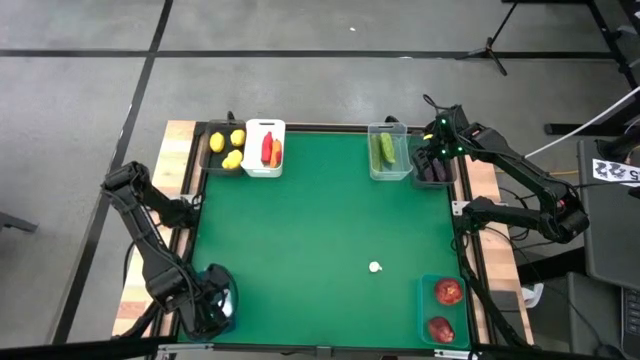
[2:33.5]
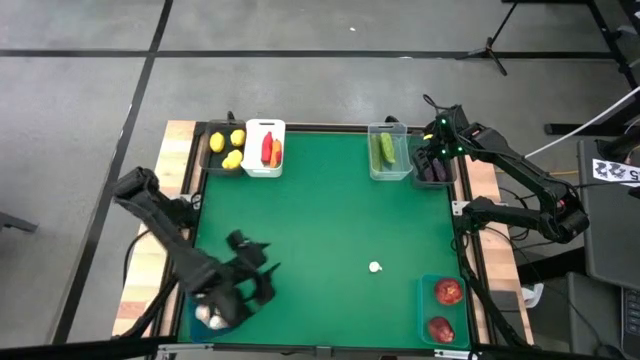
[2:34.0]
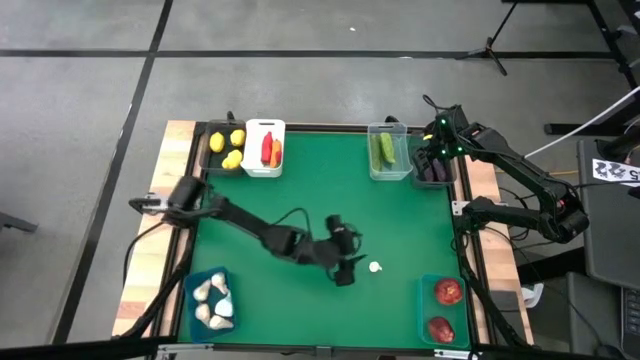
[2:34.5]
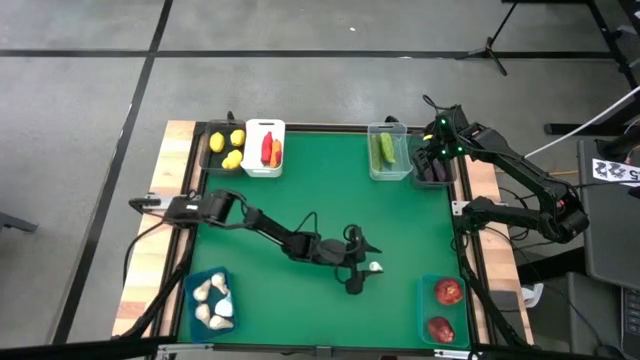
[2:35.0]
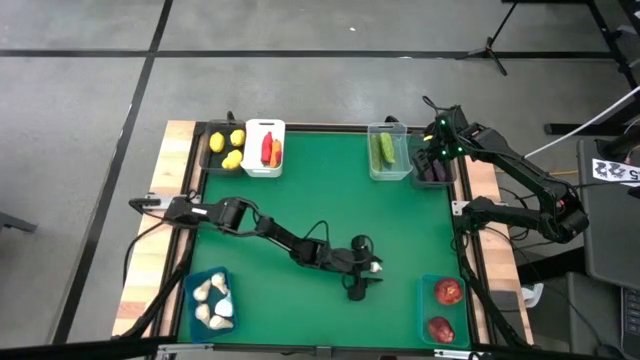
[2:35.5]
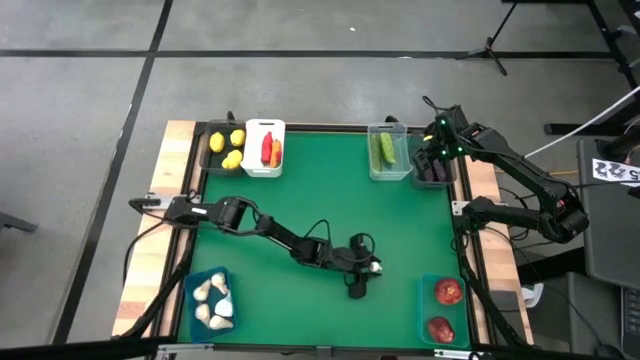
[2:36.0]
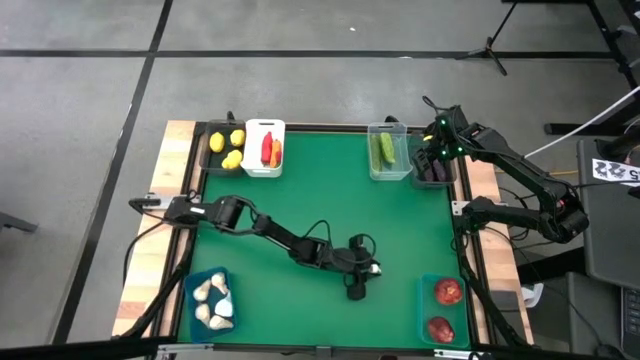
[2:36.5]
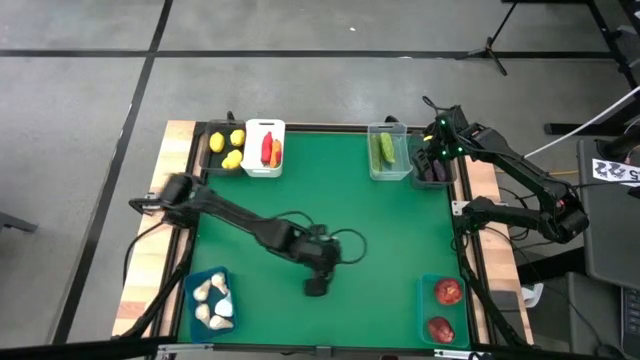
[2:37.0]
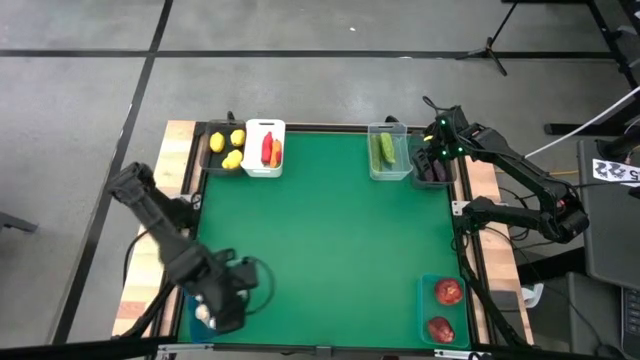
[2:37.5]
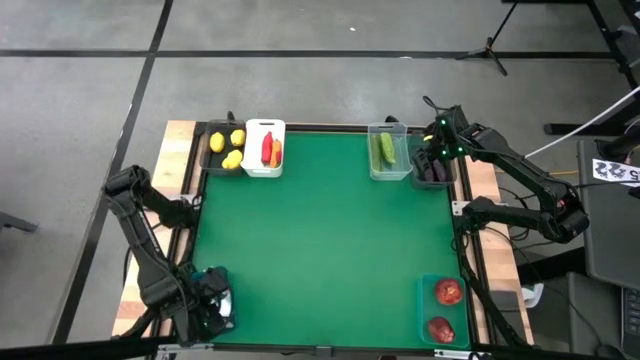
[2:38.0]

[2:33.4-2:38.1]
Task: Sort produce into baskets
Put the garlic into the blue bin

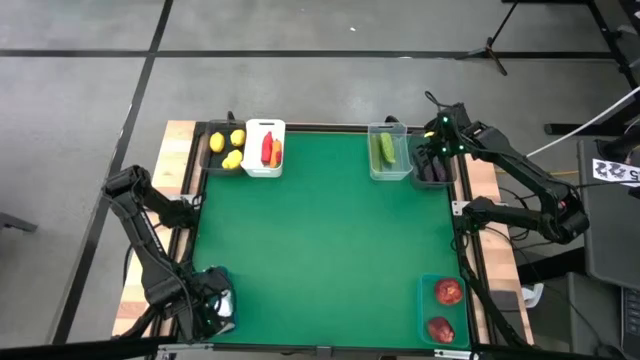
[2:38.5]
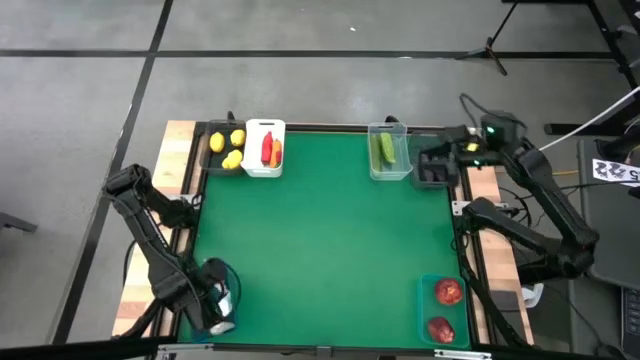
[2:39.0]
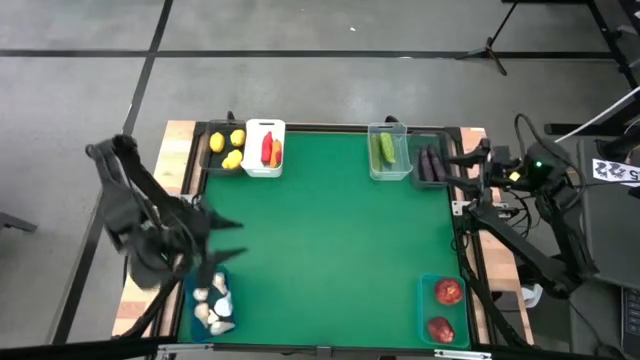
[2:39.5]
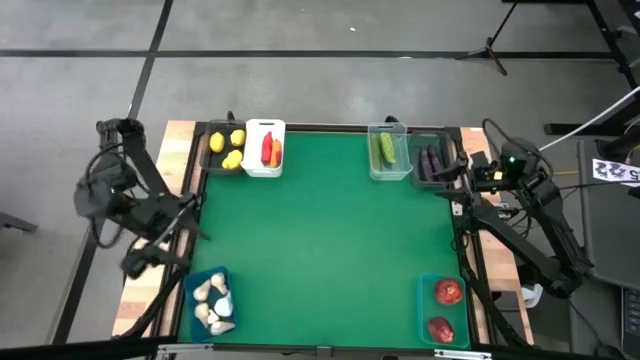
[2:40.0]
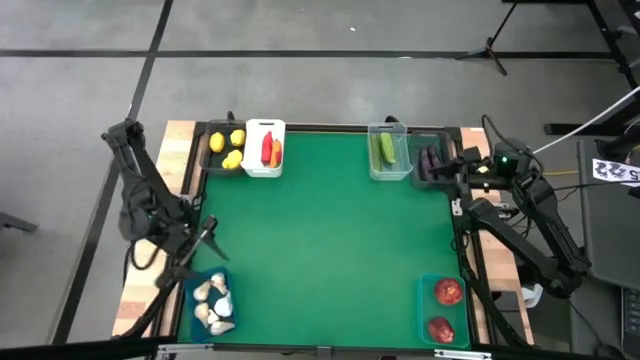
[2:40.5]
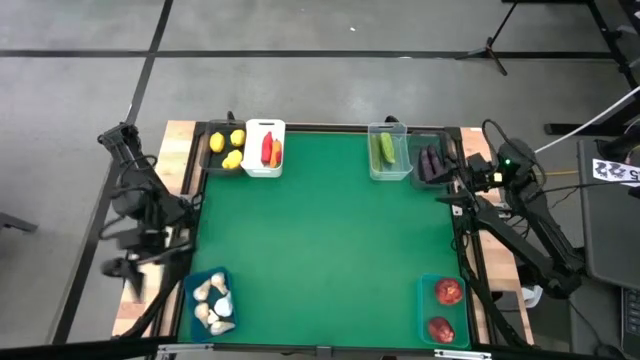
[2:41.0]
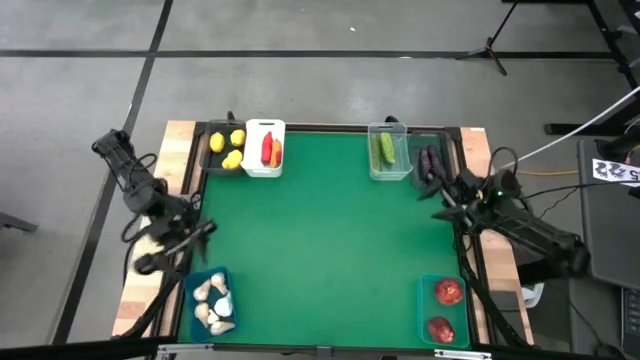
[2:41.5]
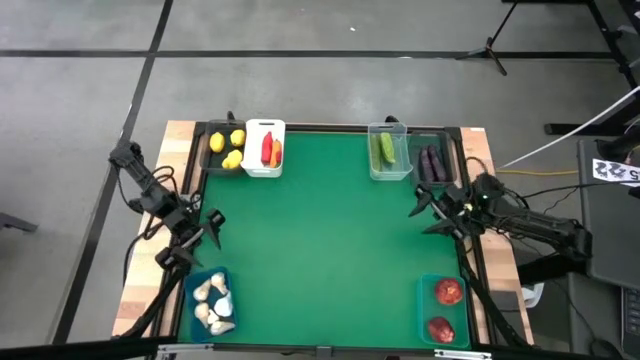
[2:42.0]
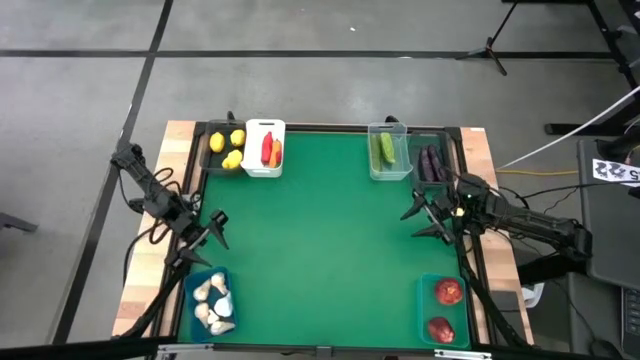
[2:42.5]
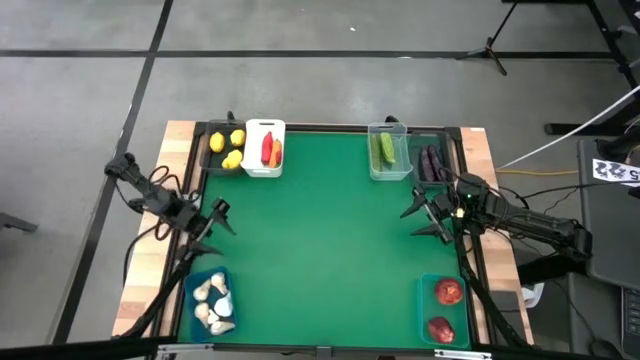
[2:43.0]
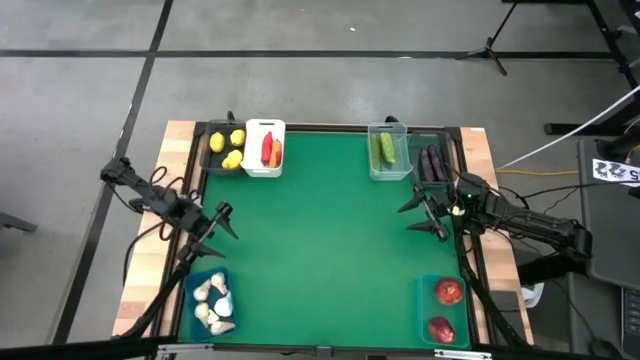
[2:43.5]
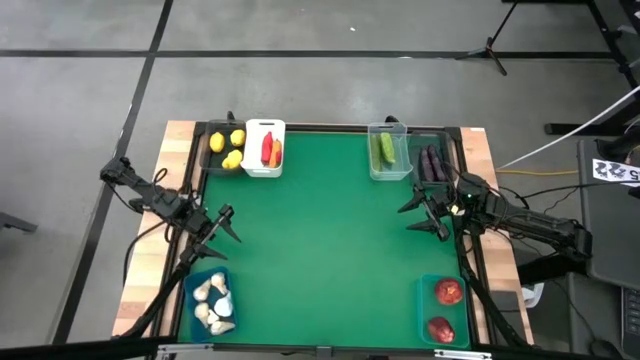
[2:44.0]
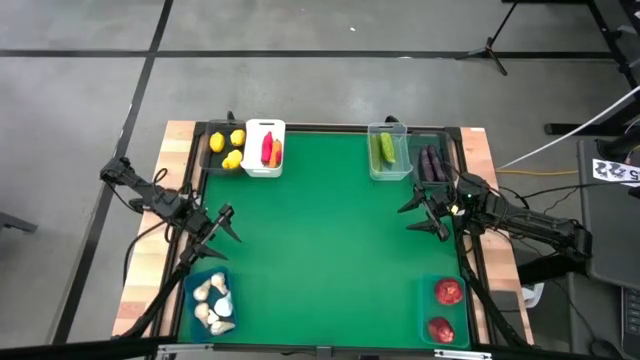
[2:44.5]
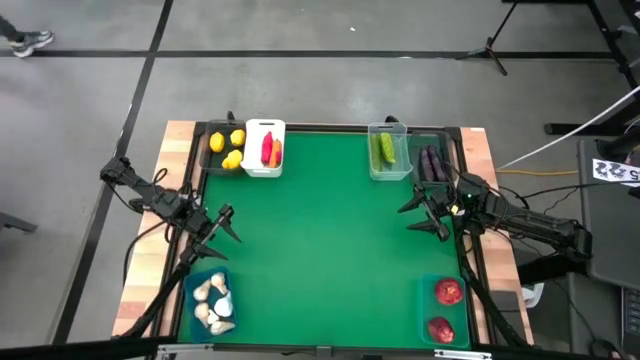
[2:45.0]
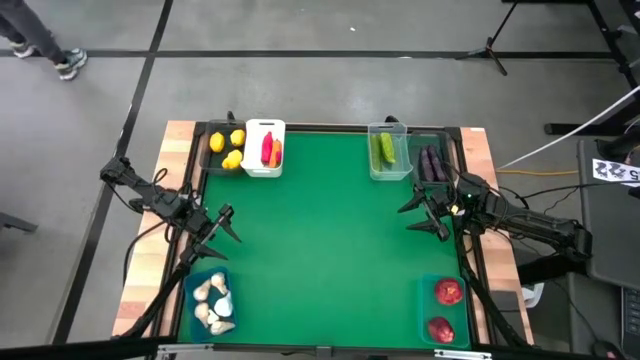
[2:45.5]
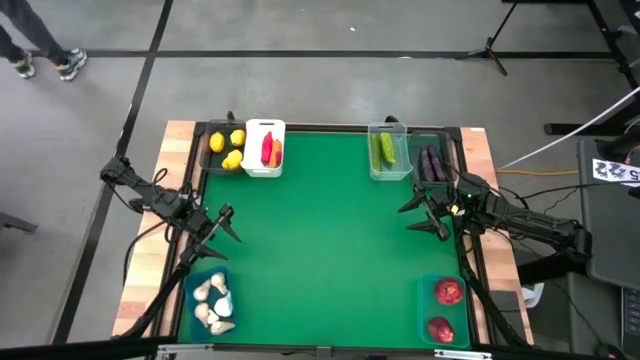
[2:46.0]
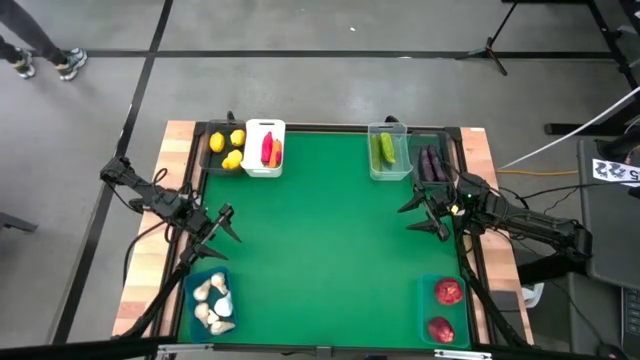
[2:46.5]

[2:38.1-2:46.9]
Return to Home Position

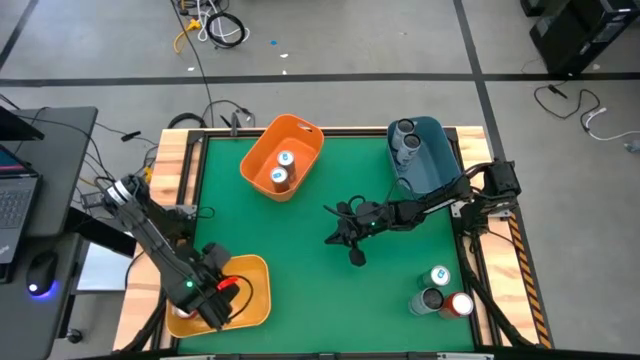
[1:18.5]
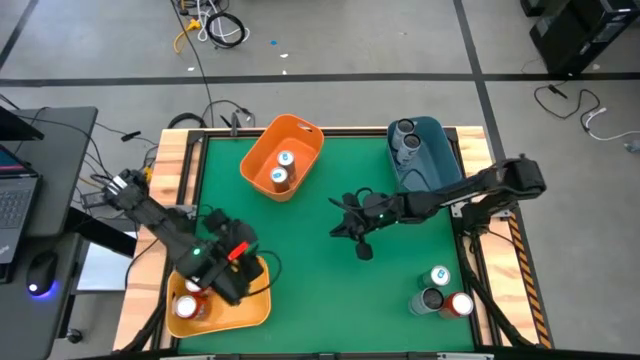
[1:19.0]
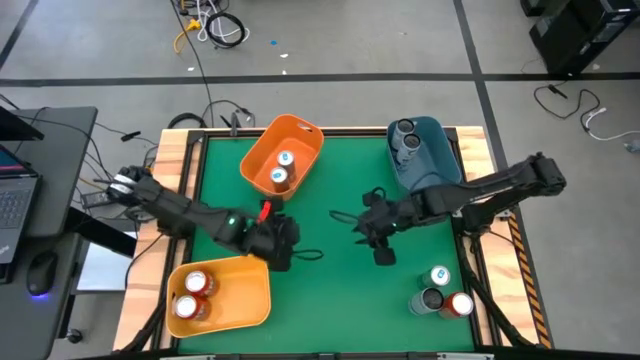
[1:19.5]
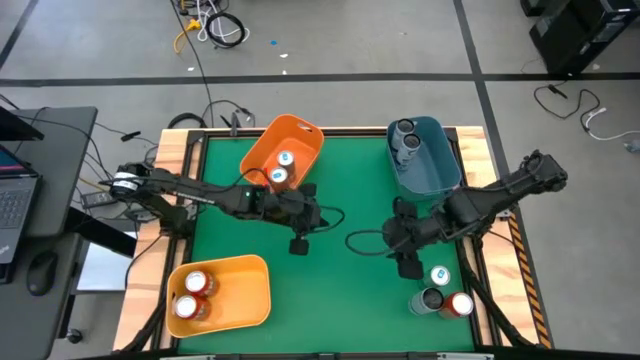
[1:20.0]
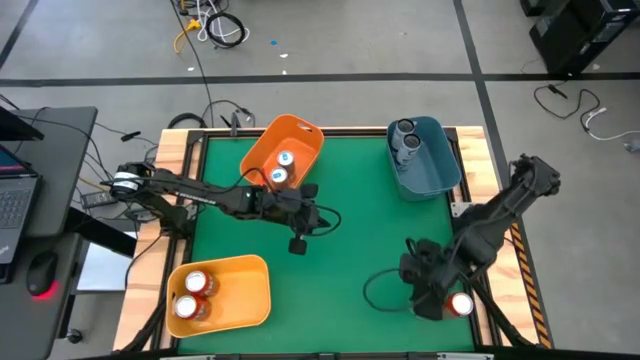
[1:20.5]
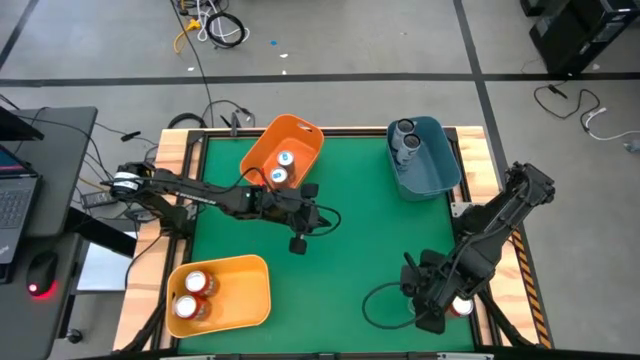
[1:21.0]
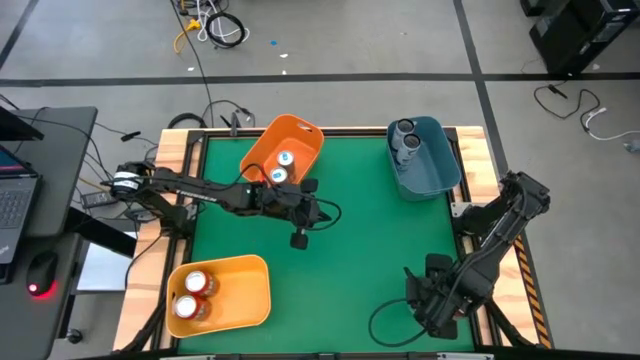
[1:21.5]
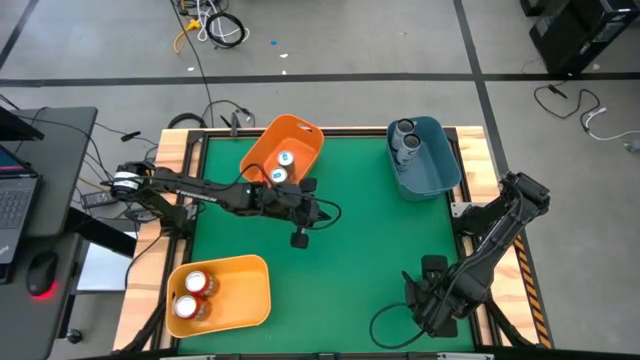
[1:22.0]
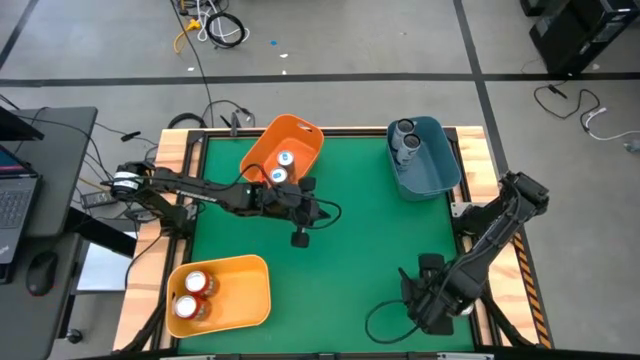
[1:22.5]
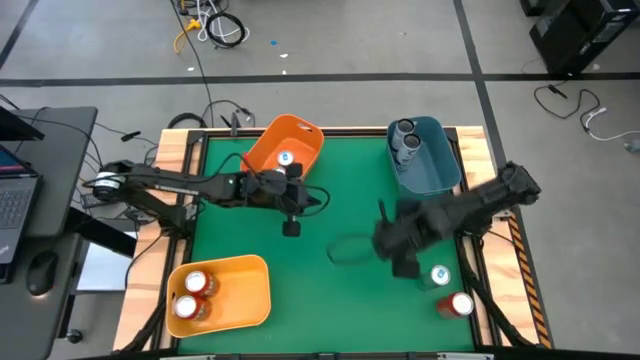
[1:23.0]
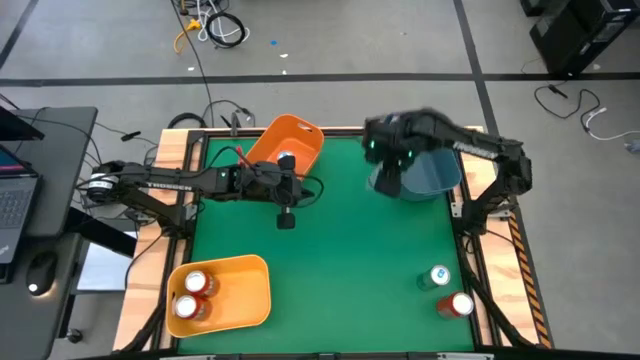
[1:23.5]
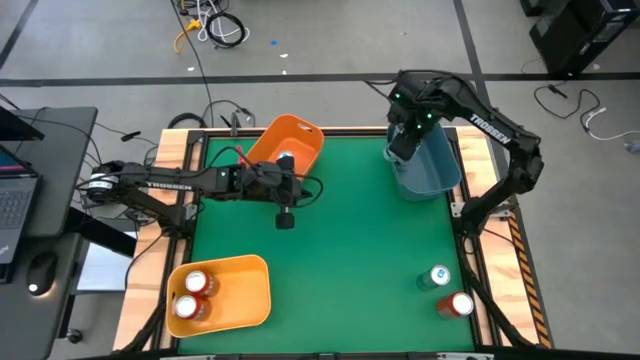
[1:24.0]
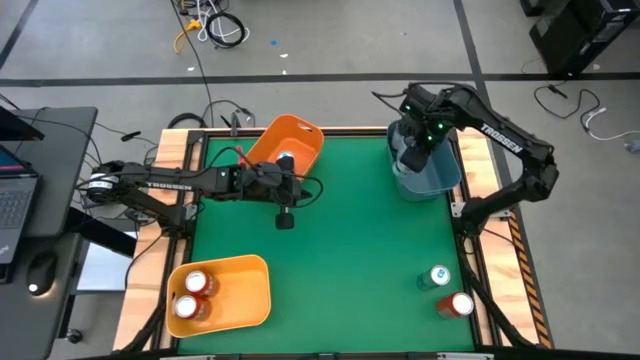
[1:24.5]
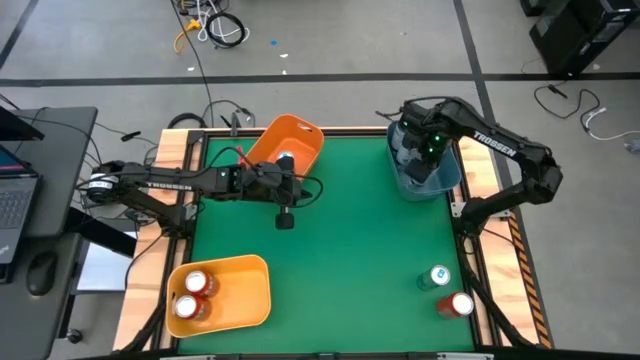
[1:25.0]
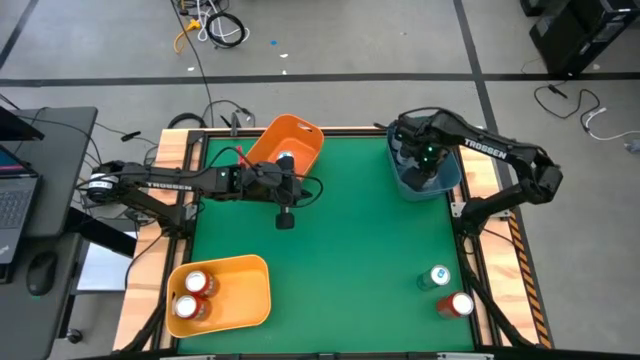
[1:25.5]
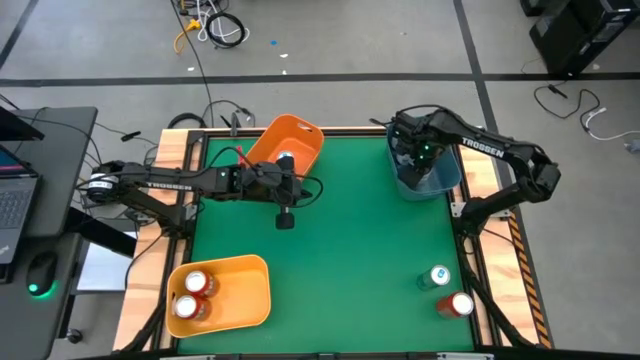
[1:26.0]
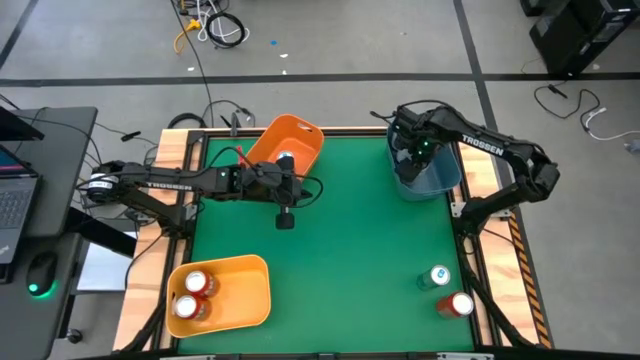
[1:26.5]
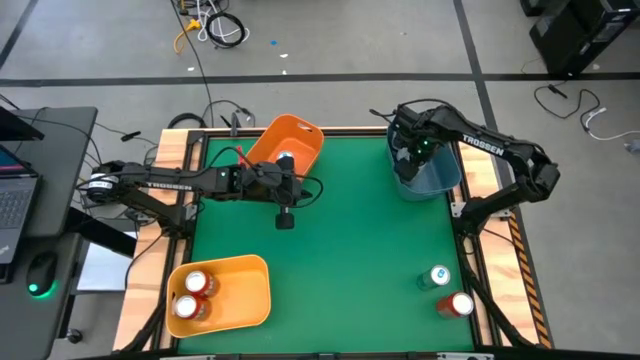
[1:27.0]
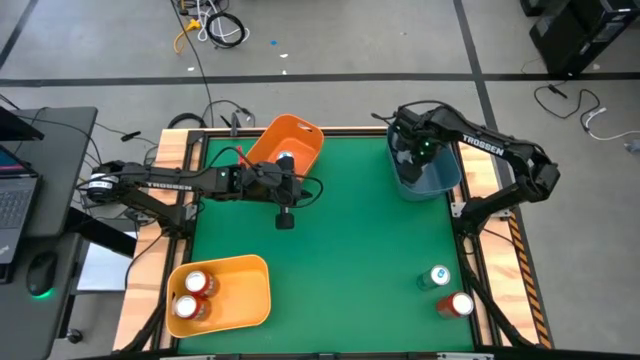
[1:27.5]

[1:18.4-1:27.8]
Task: Sort soda cans
Put the white-blue soda can into the blue bin
